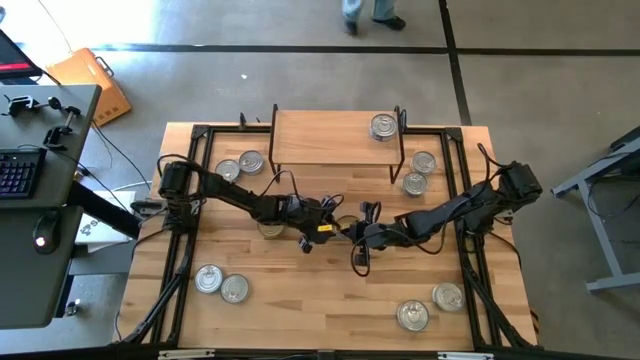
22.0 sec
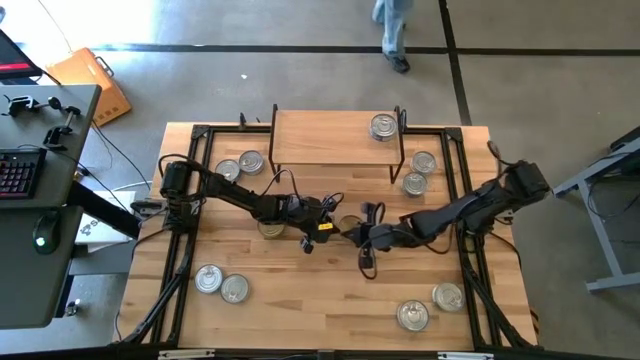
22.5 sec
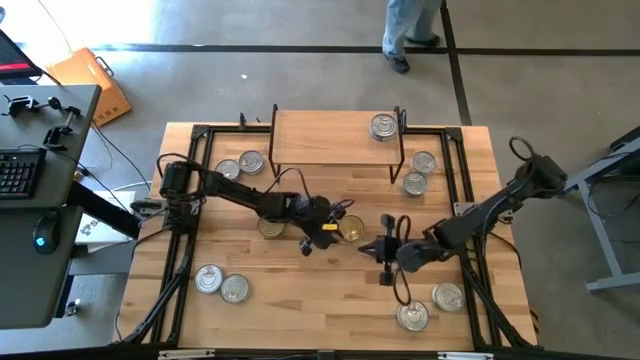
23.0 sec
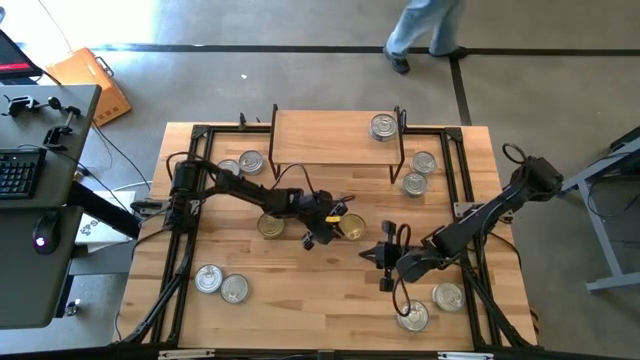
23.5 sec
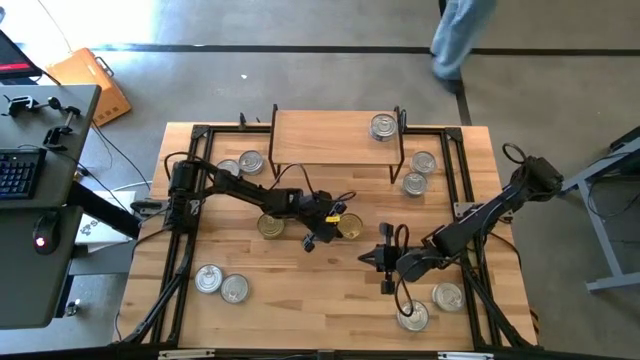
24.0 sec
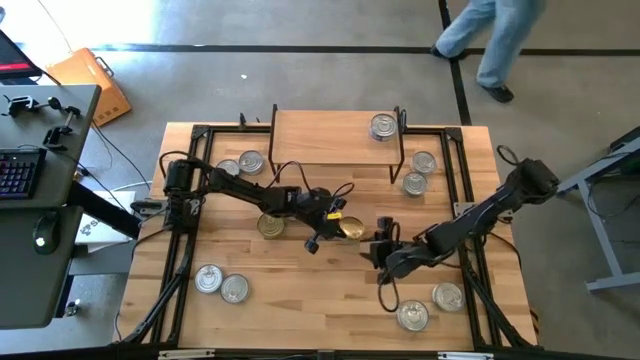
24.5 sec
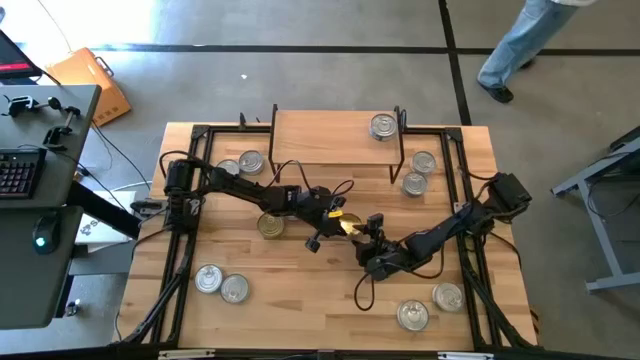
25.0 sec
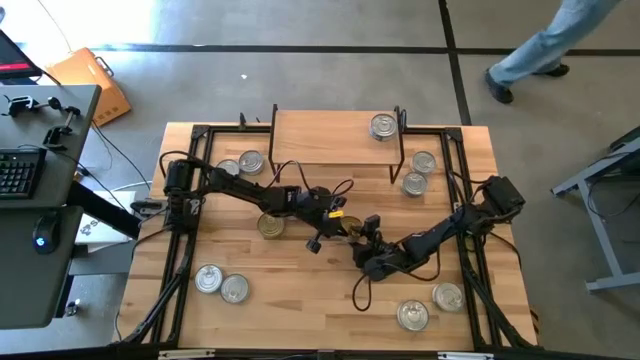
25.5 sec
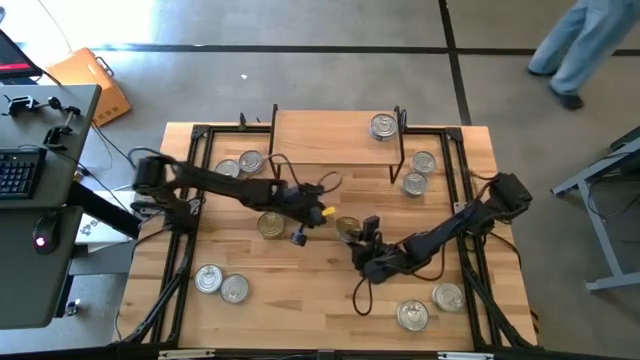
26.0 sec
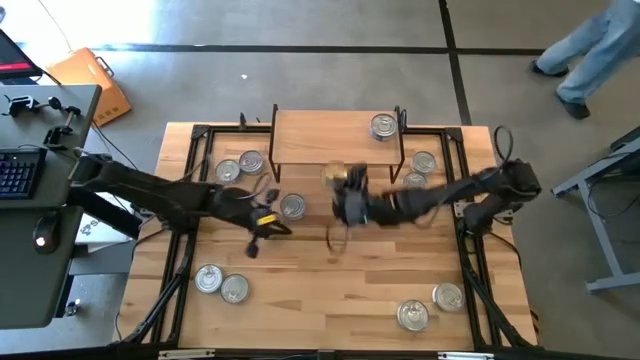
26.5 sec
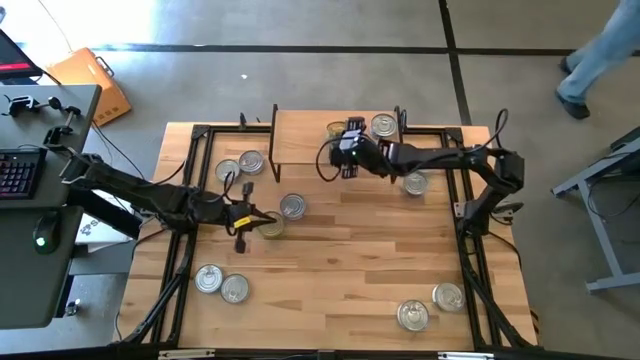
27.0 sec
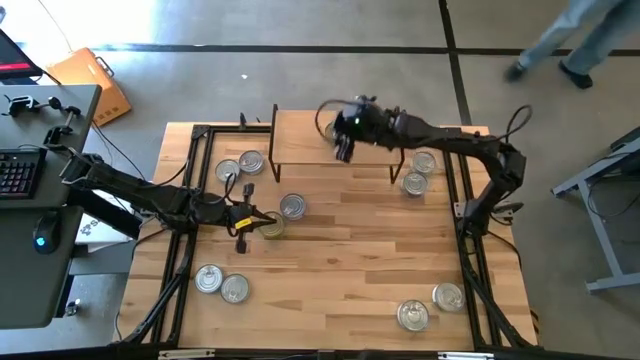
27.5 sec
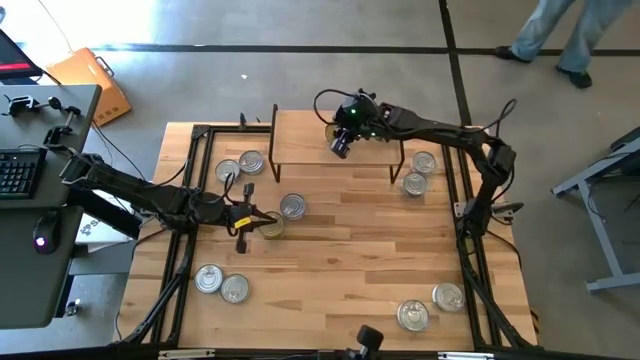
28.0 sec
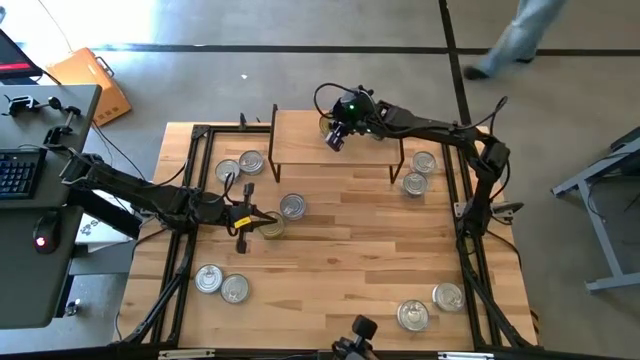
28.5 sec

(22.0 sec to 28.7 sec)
Task: Stack canned seafood by type on shelf
Put the green tuna can on the shelf

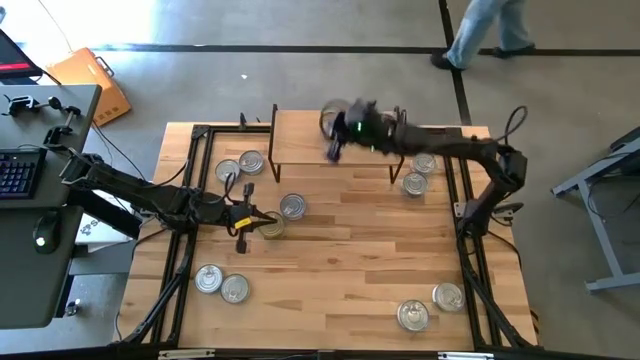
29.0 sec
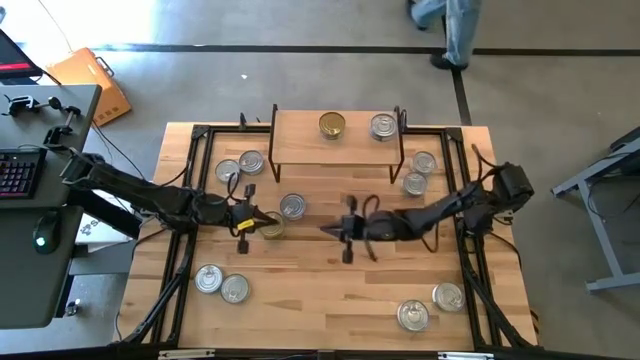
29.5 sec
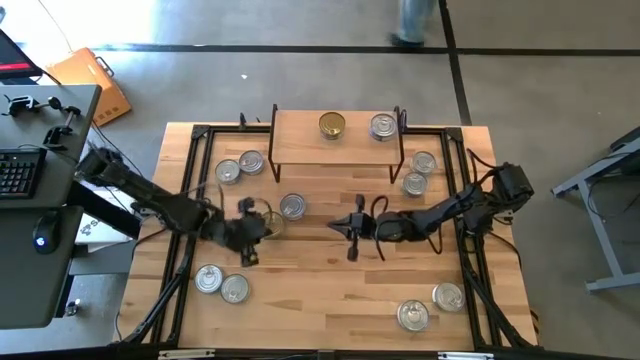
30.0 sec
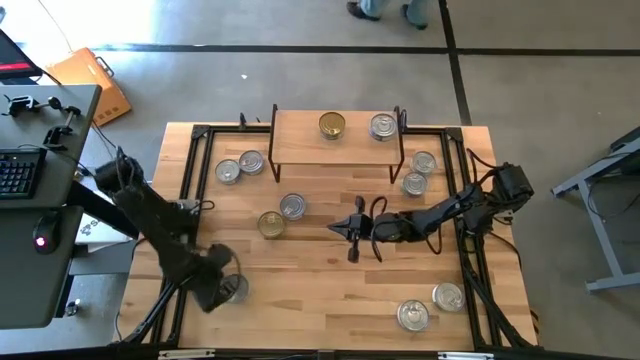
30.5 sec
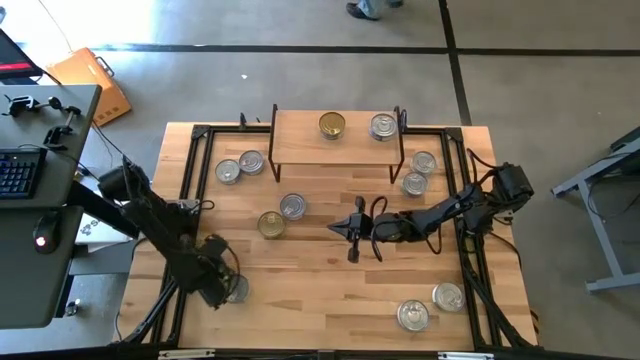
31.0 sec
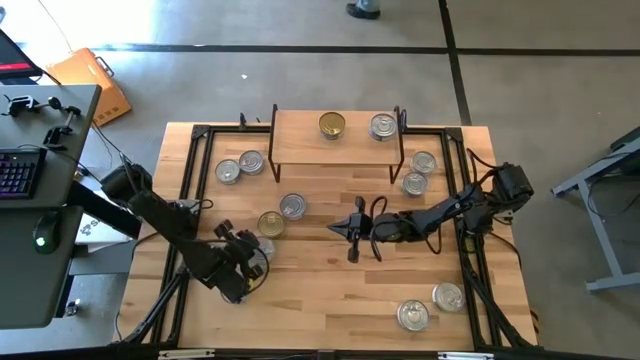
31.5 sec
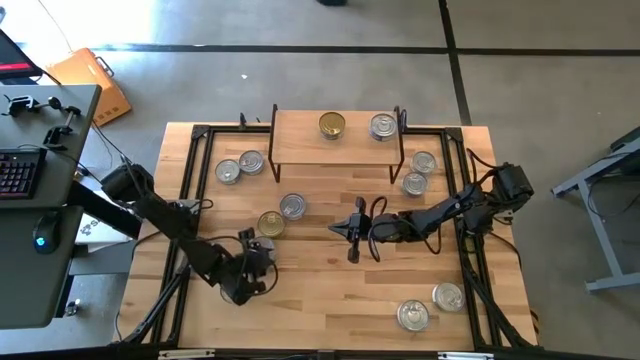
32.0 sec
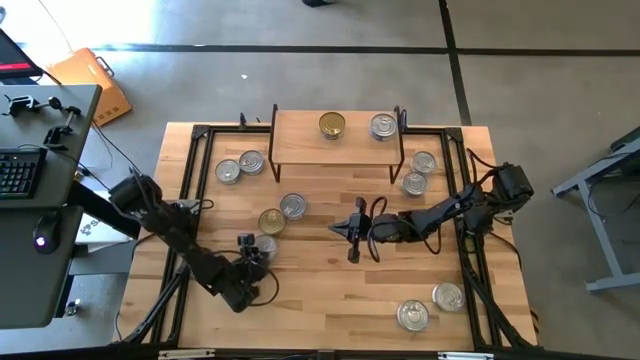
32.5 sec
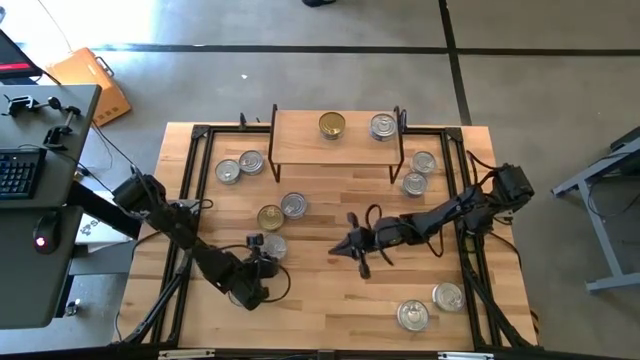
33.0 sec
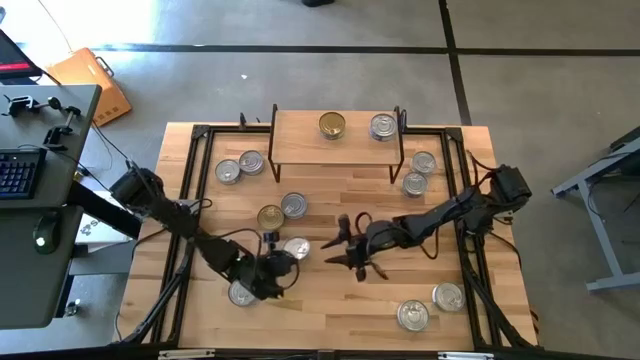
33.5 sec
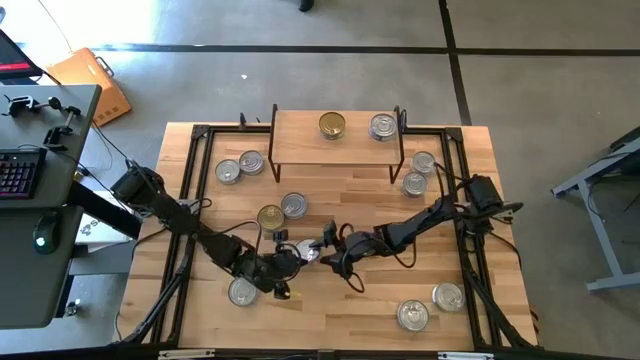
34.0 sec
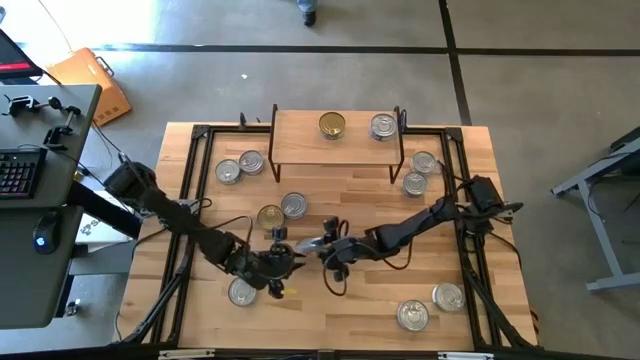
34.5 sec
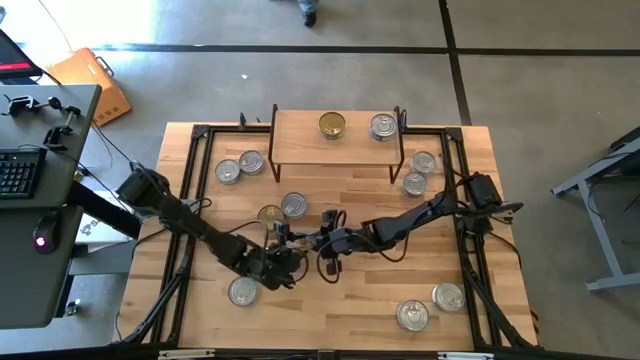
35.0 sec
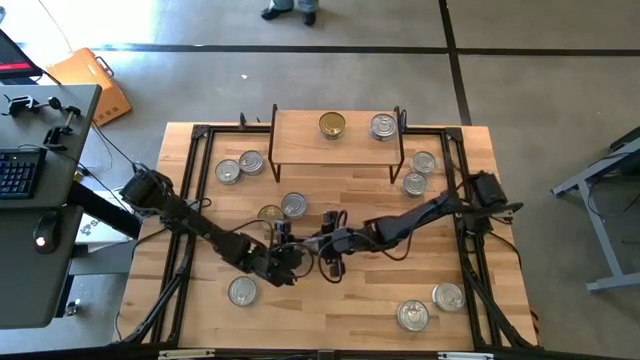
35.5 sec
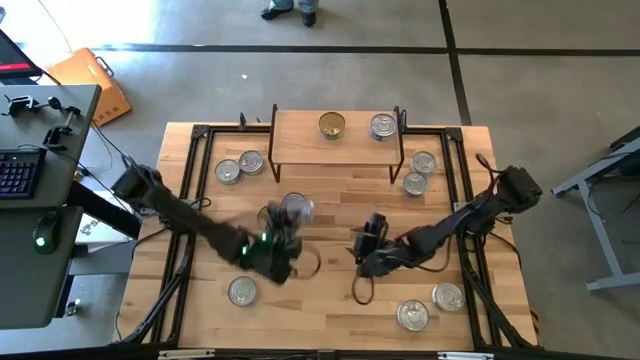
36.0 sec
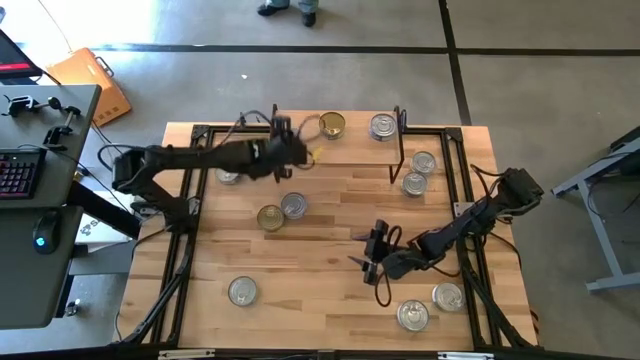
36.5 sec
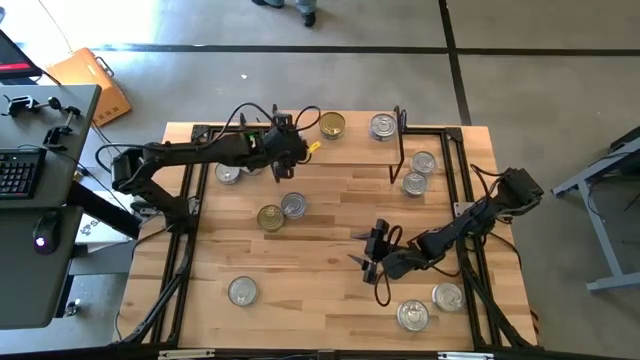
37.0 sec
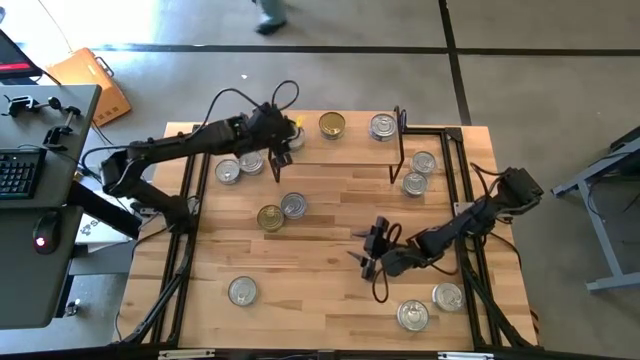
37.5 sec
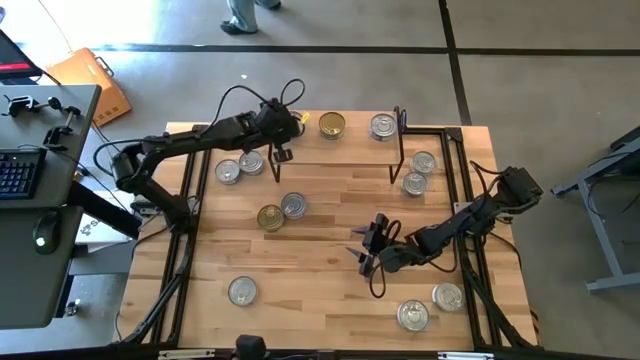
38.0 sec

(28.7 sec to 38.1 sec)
Put the yellow tuna can on the shelf

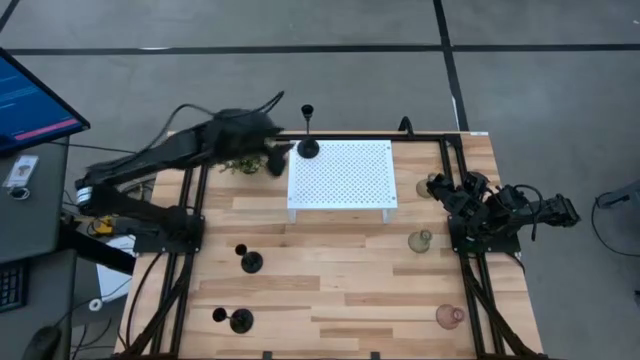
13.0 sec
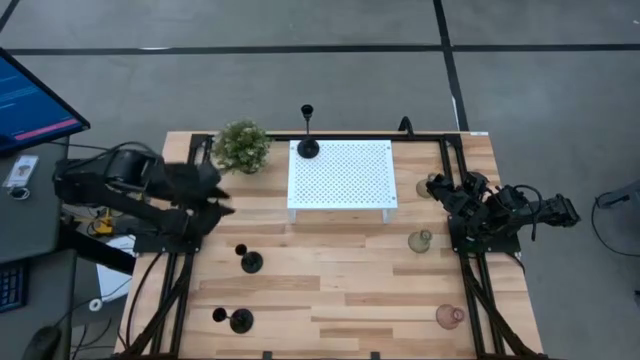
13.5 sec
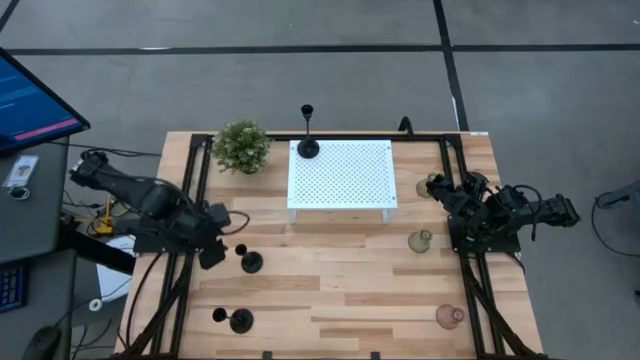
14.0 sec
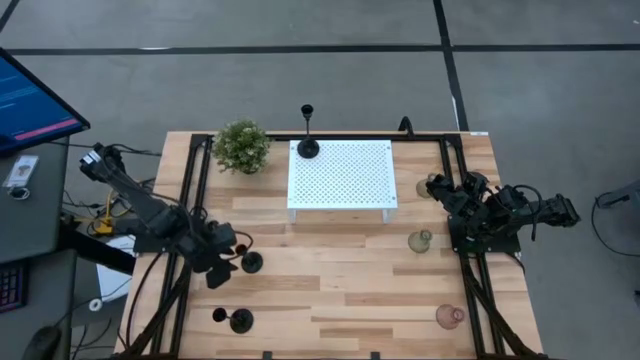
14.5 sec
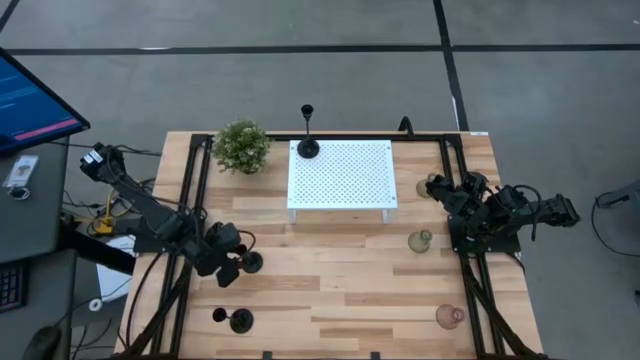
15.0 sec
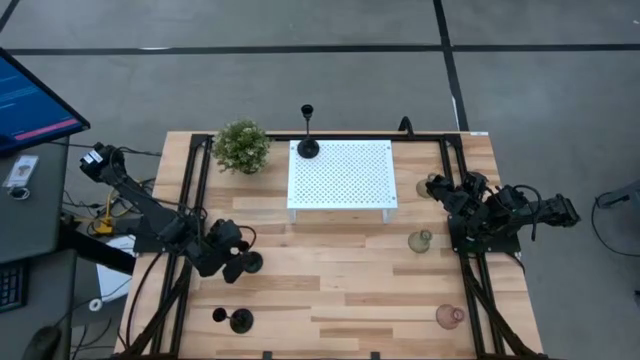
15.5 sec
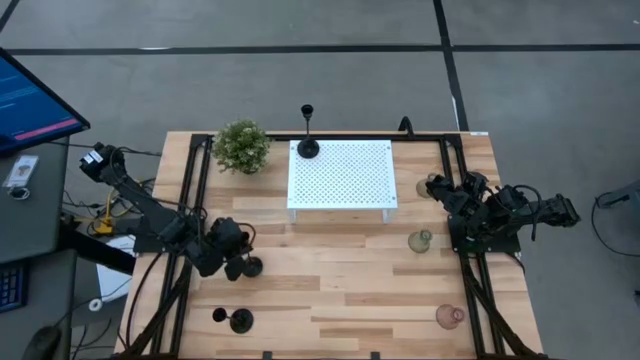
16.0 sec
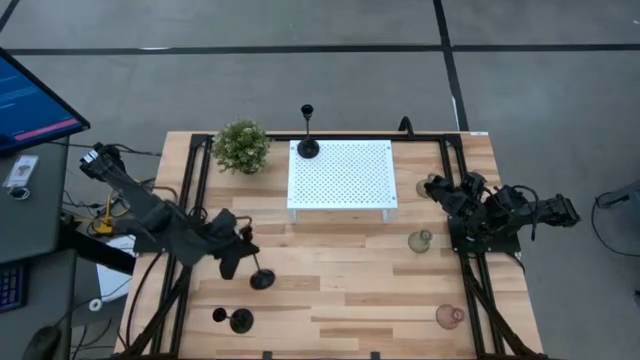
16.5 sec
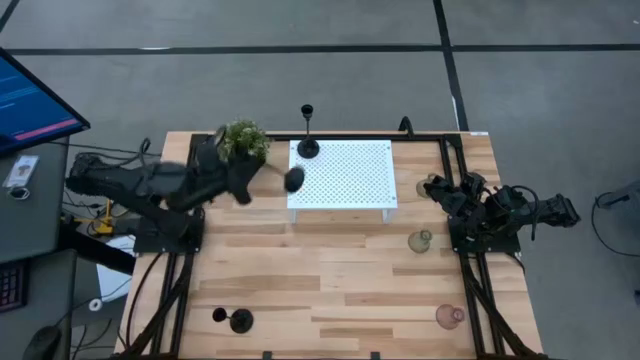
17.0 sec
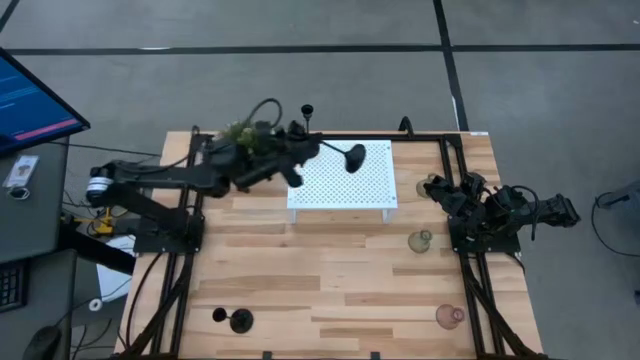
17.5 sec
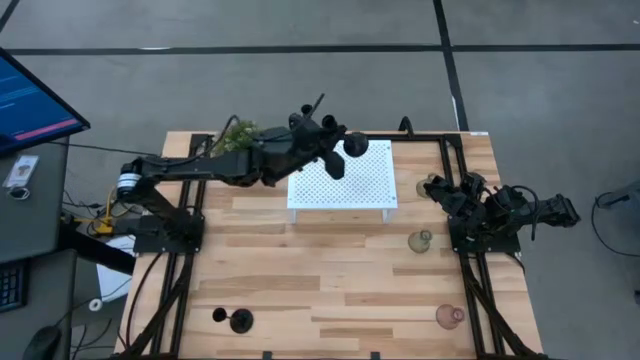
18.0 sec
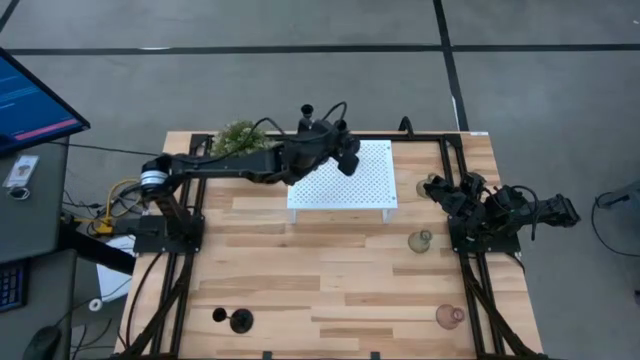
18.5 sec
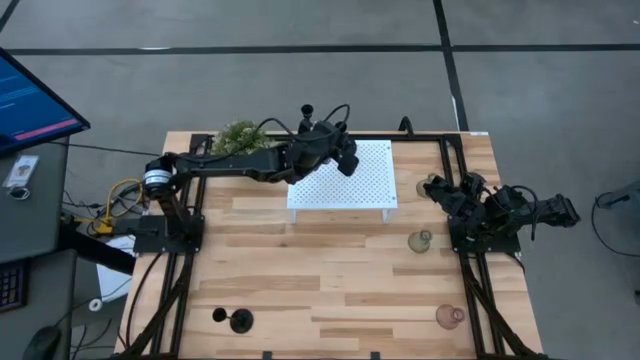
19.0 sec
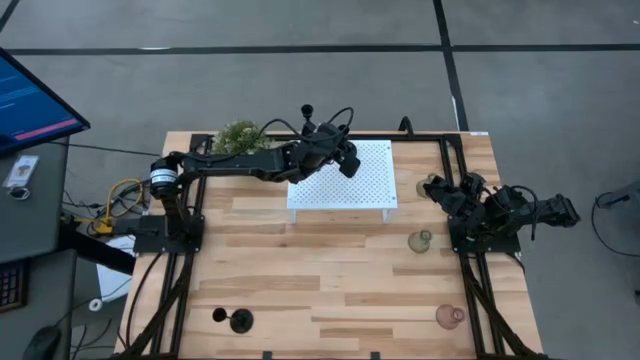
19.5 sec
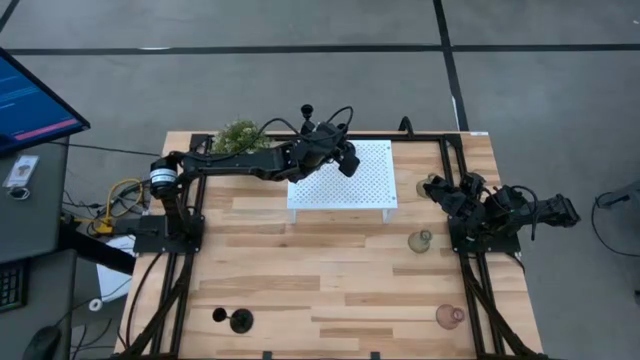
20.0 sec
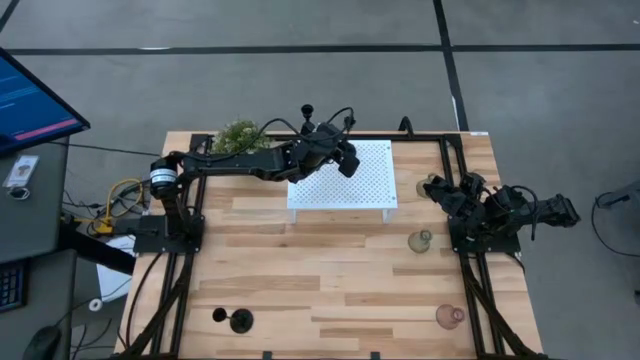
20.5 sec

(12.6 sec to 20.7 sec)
Task: Pick & Place candle stick holders
Put the top black candle holder on the shelf
